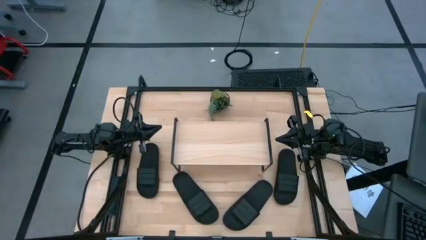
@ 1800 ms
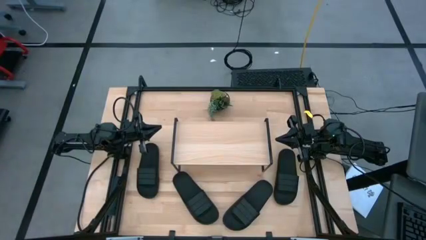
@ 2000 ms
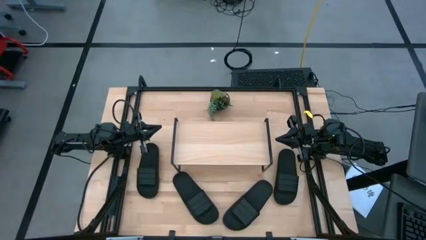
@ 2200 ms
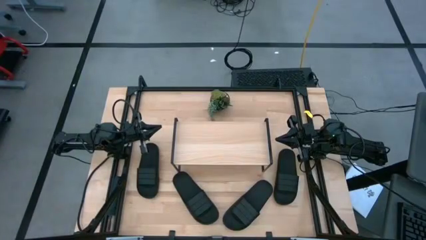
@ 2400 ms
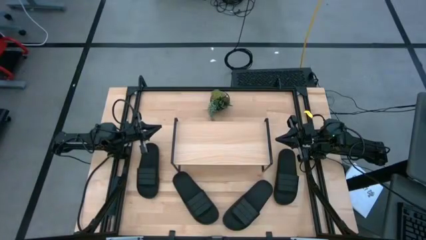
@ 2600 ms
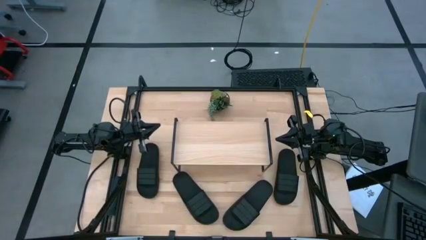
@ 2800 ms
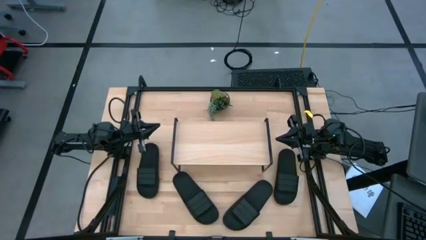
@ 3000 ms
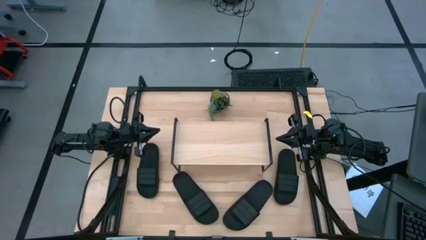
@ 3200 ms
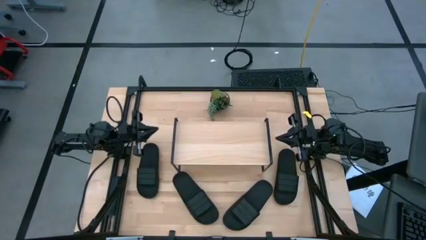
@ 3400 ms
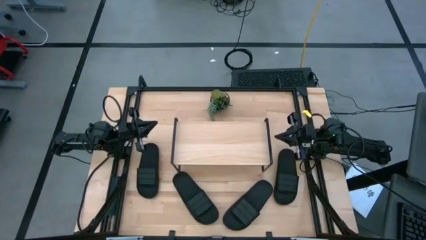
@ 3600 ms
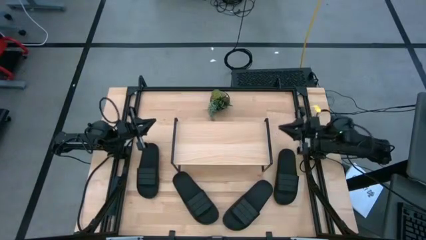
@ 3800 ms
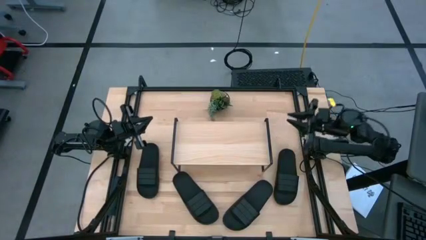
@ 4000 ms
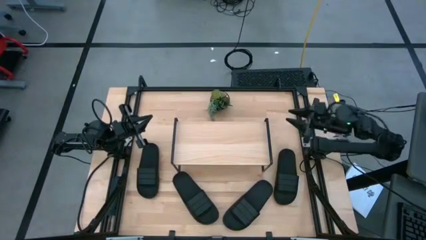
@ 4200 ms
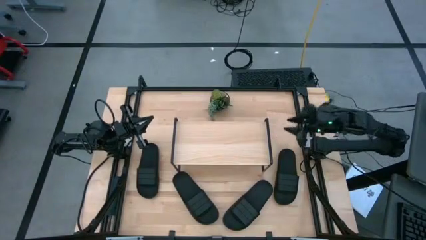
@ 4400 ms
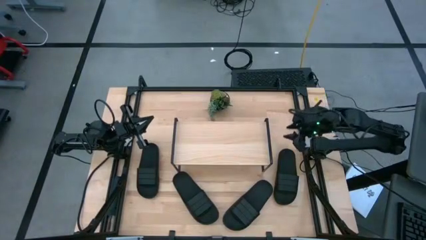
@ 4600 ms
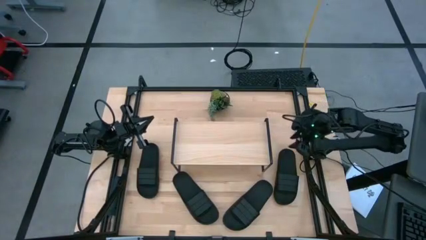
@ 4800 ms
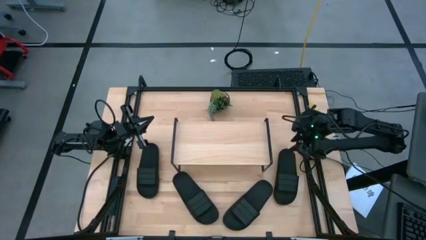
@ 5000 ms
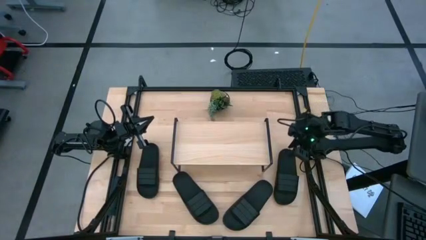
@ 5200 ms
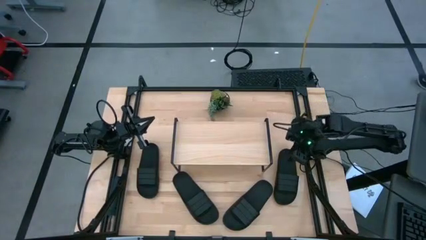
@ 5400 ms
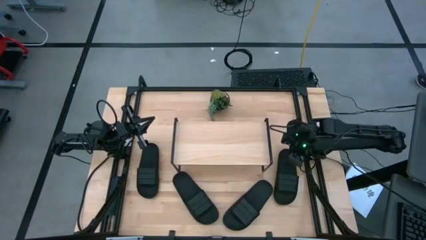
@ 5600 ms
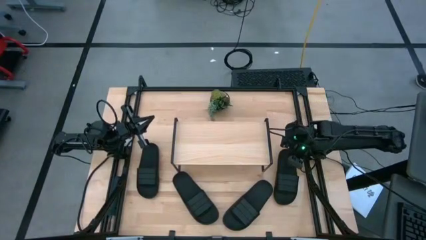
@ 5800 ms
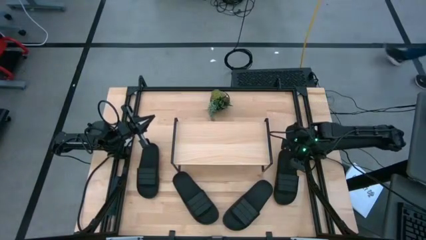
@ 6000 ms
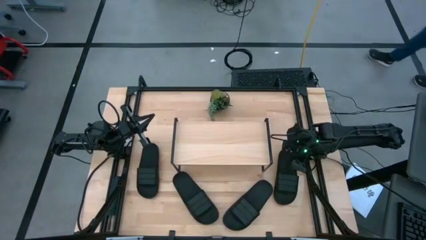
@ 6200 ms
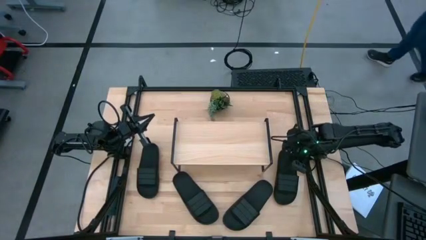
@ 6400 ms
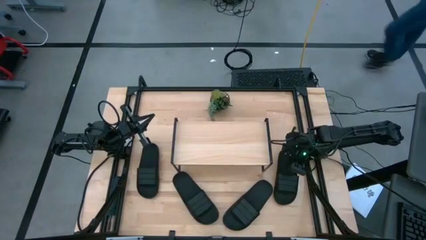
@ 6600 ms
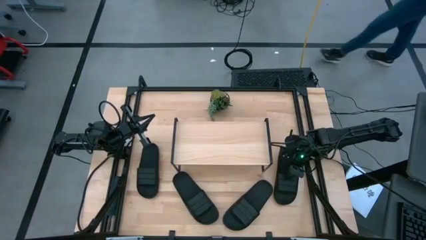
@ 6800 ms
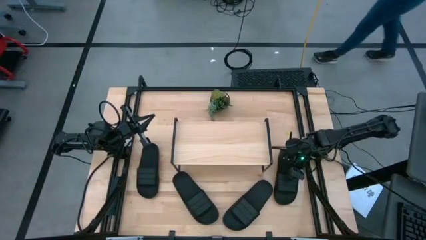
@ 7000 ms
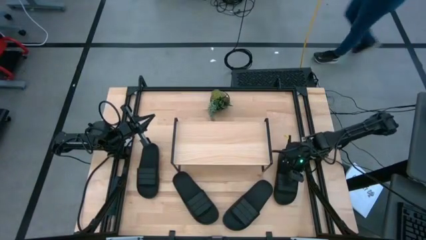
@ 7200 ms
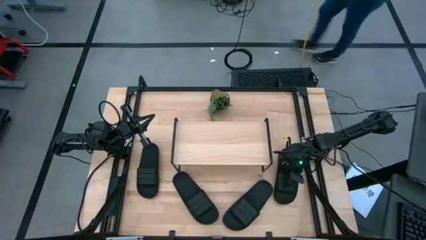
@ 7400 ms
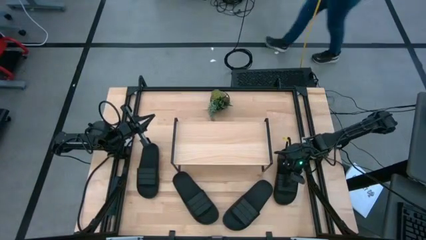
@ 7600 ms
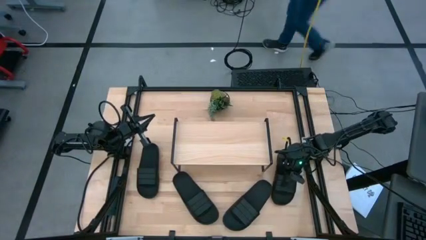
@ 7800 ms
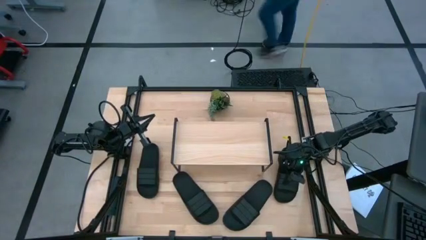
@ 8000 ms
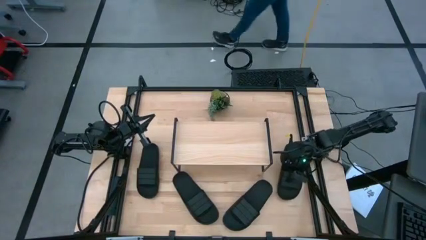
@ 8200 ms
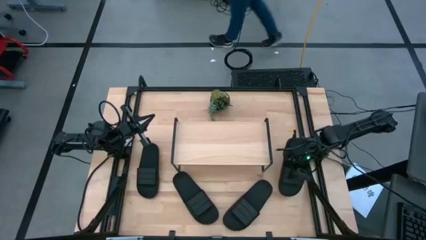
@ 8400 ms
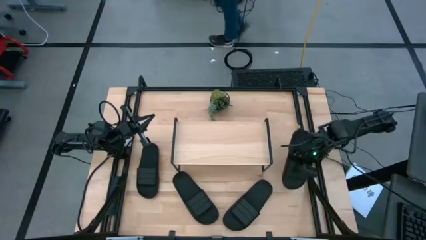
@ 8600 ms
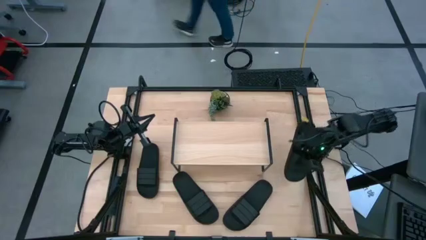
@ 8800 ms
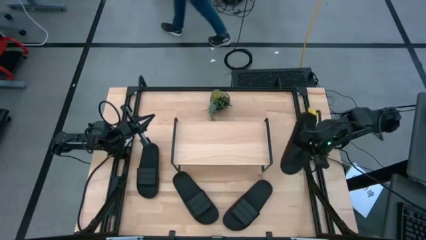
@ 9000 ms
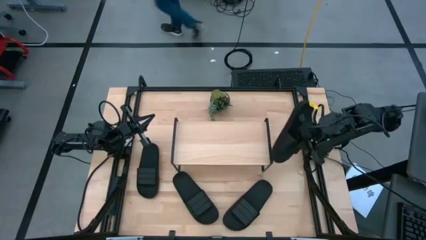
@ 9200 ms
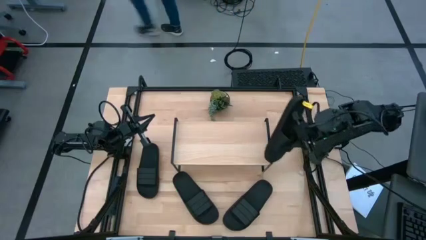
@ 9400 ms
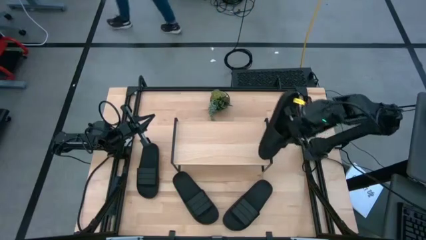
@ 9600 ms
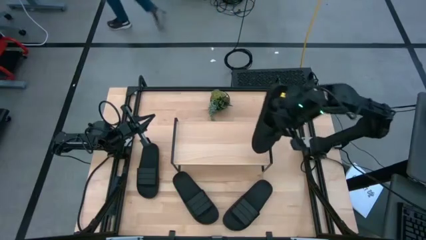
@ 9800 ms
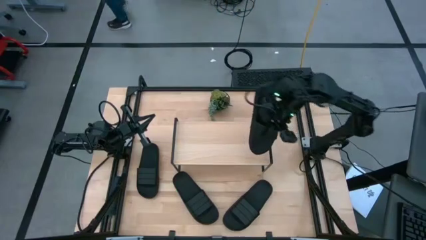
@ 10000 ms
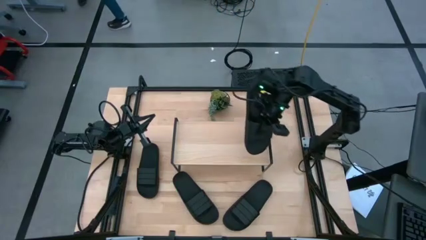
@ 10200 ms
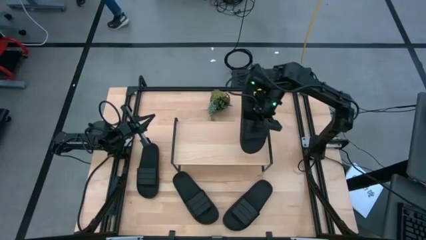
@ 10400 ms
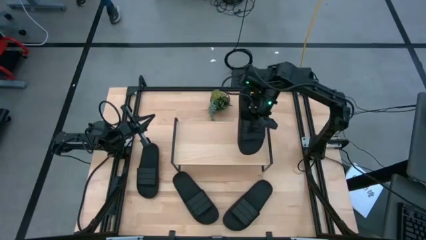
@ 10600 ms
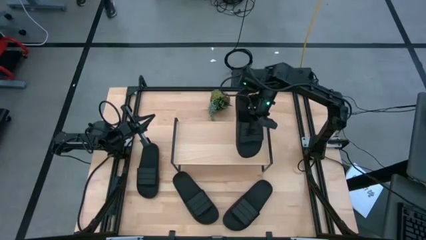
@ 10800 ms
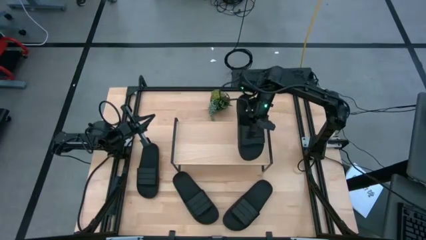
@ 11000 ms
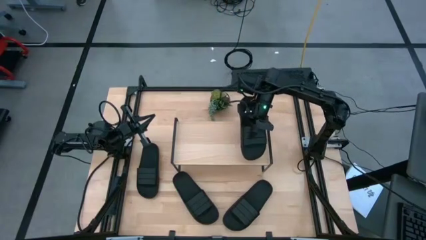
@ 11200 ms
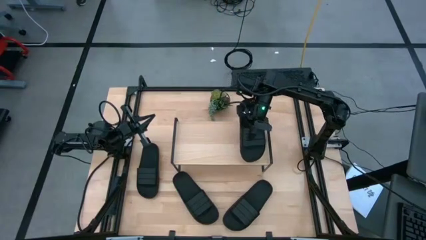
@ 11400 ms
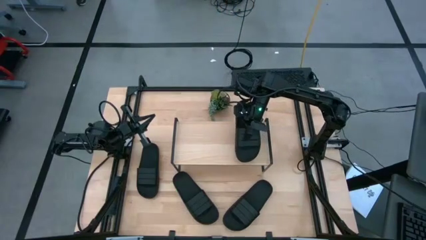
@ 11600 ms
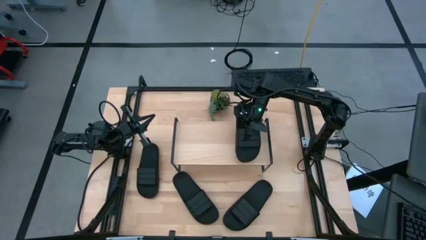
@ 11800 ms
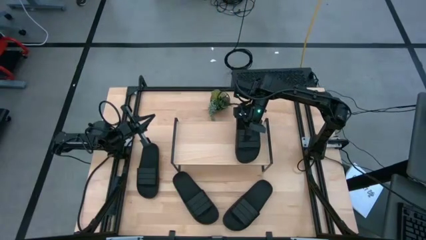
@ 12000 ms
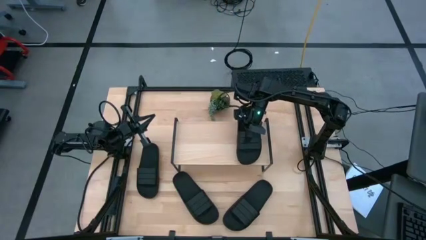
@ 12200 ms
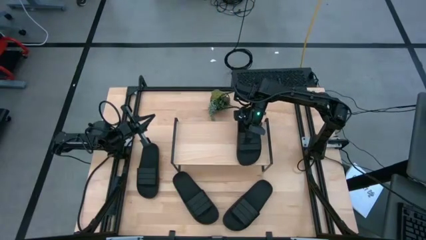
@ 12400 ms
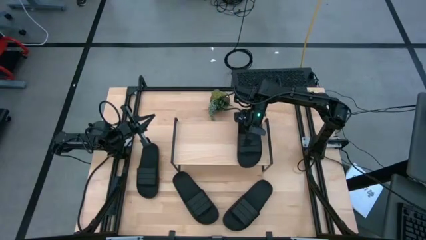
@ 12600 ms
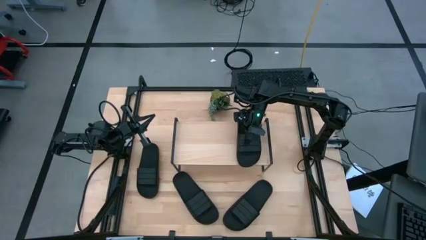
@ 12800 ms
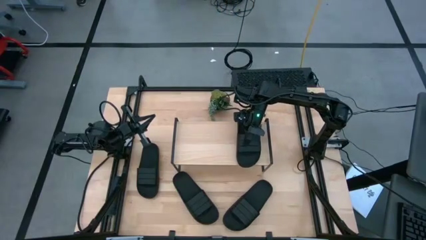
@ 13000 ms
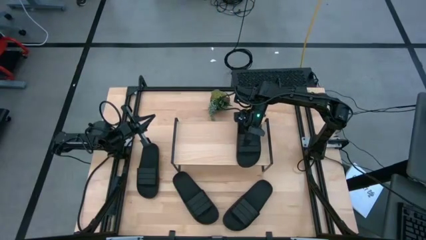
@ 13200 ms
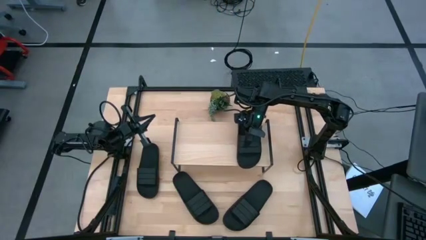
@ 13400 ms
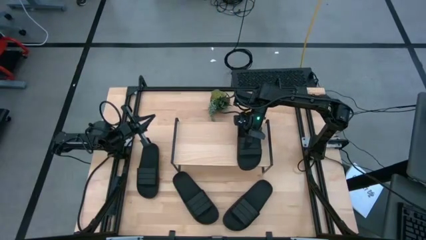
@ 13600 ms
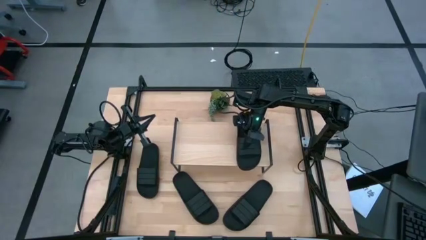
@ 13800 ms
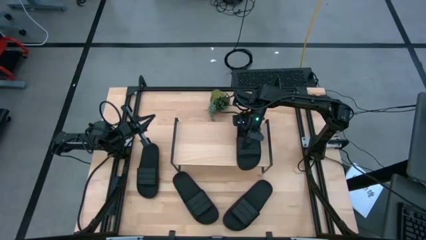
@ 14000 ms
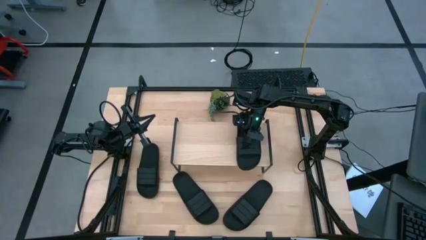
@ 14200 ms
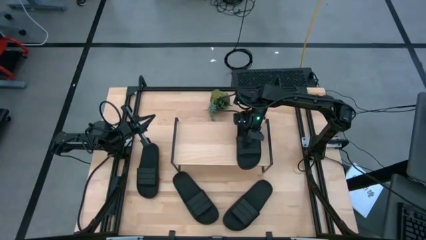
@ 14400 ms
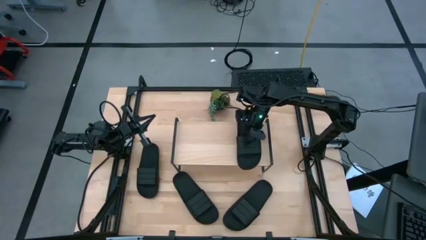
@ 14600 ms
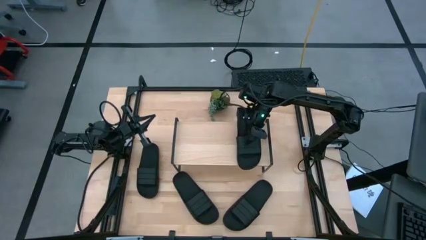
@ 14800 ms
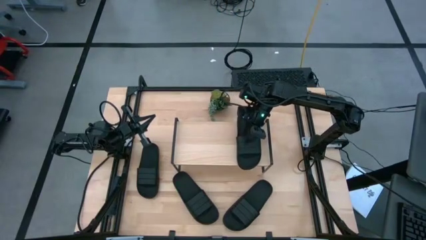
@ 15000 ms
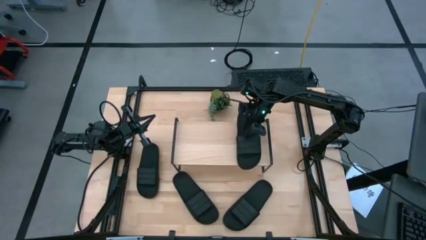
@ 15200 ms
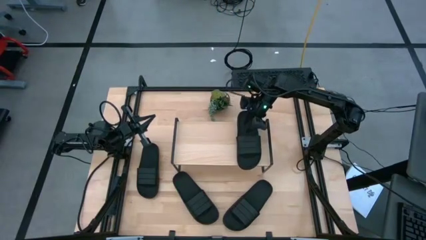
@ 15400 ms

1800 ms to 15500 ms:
Task: Pick and place slides into the shelf
Put the black slide on the shelf
